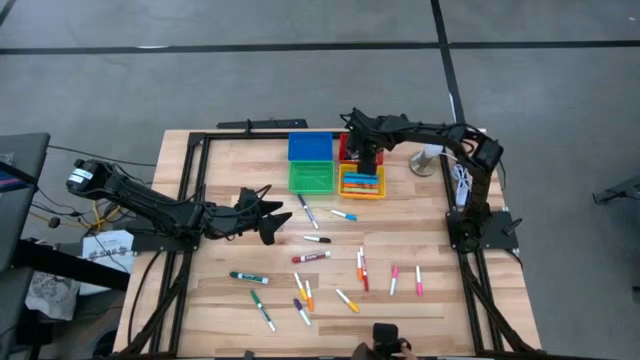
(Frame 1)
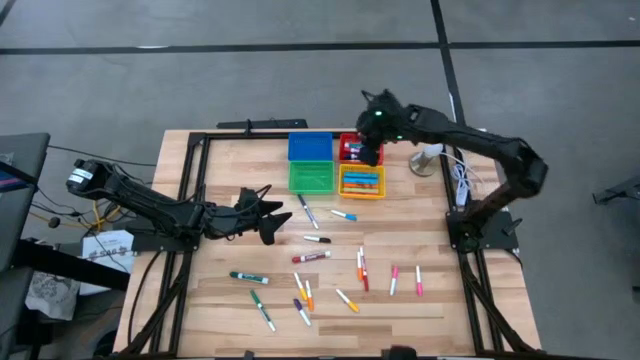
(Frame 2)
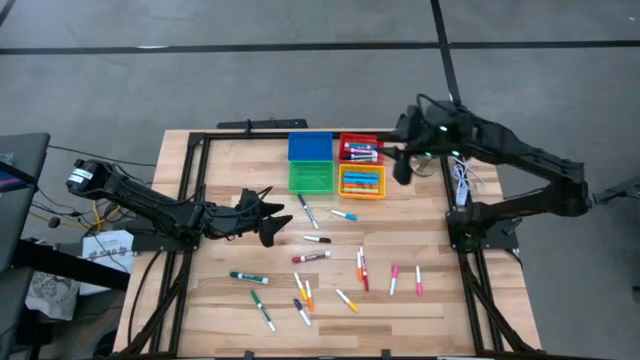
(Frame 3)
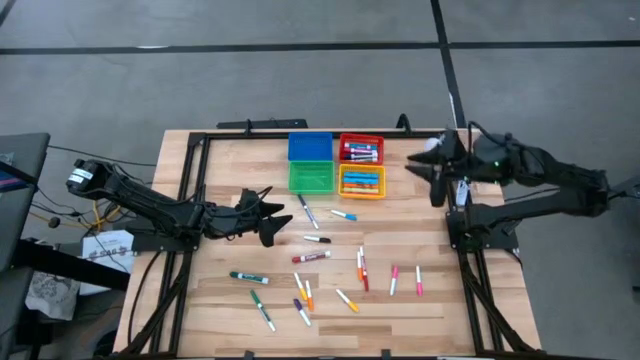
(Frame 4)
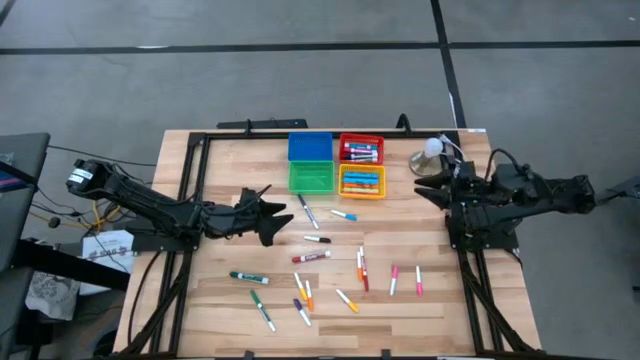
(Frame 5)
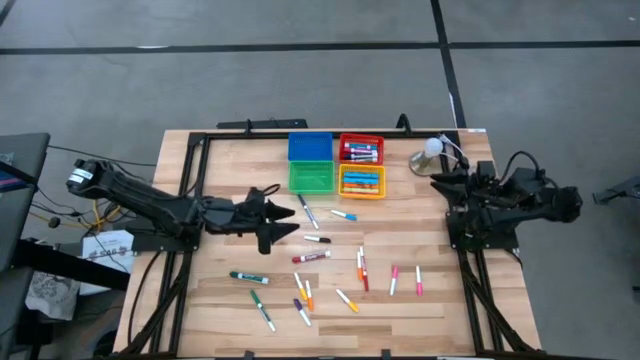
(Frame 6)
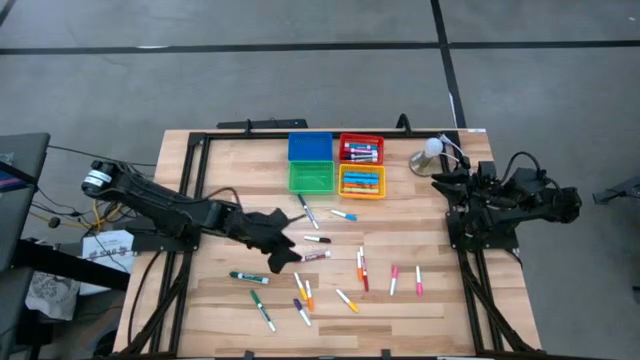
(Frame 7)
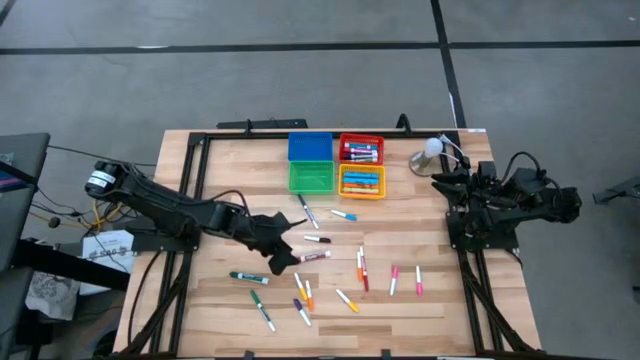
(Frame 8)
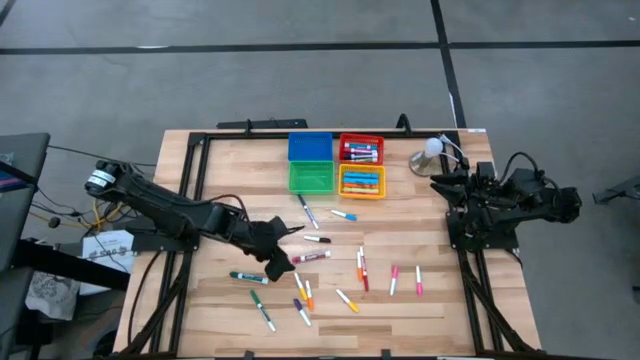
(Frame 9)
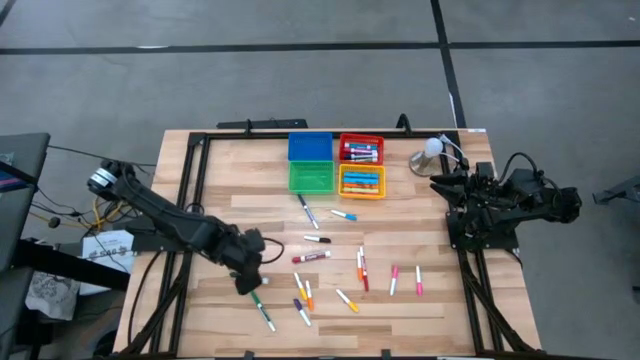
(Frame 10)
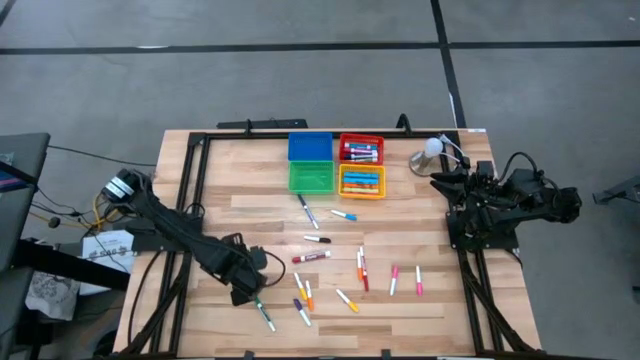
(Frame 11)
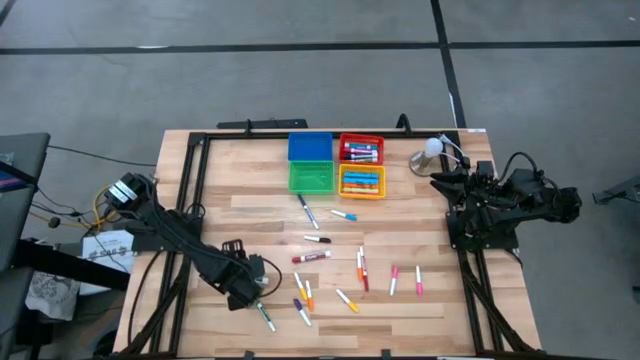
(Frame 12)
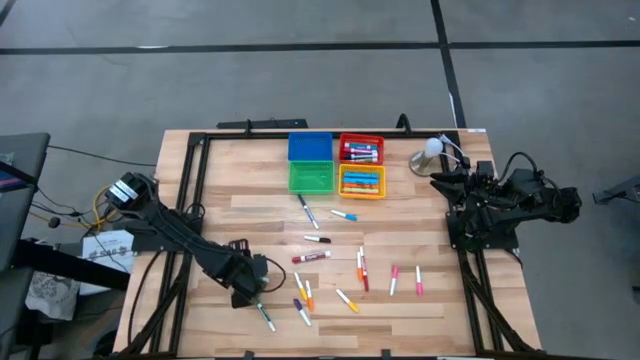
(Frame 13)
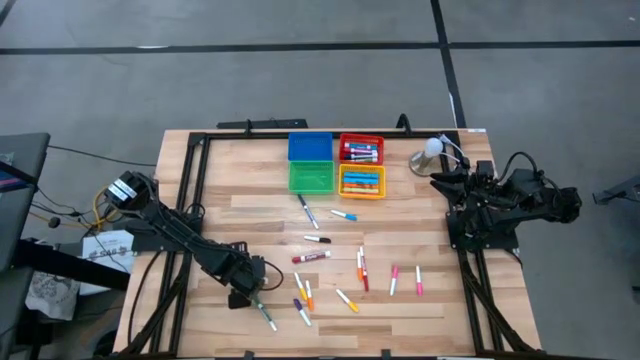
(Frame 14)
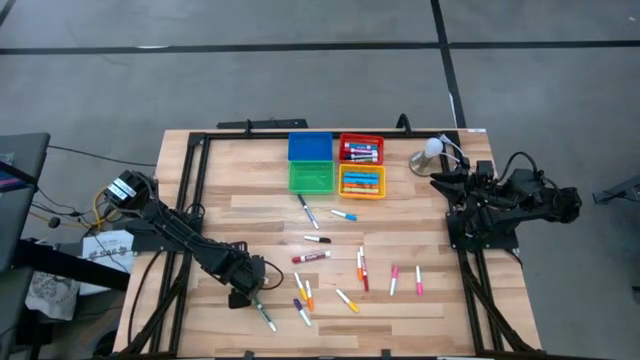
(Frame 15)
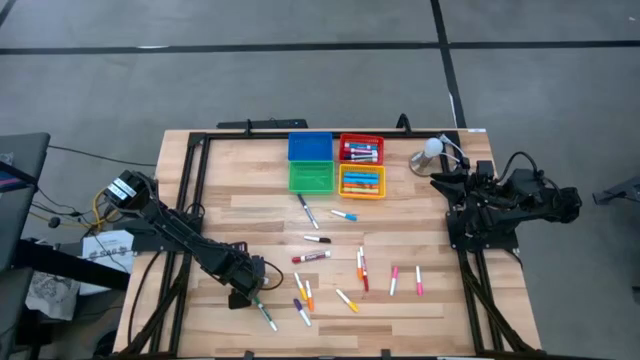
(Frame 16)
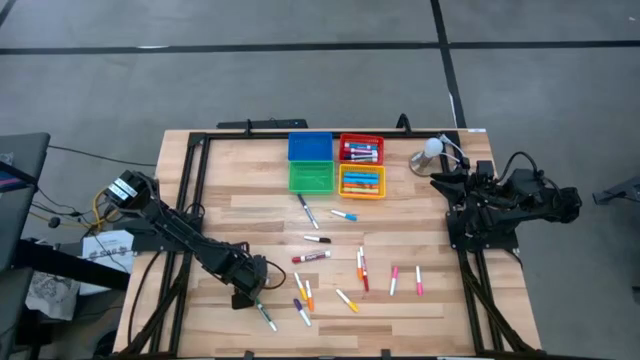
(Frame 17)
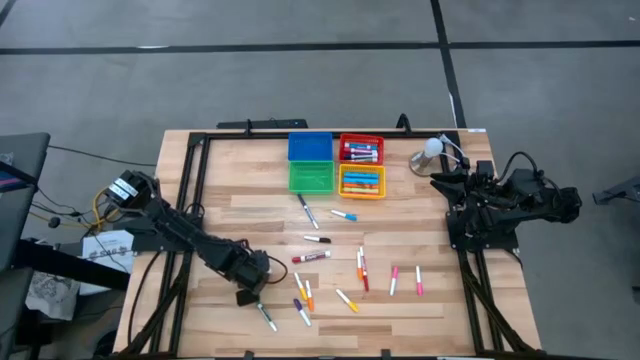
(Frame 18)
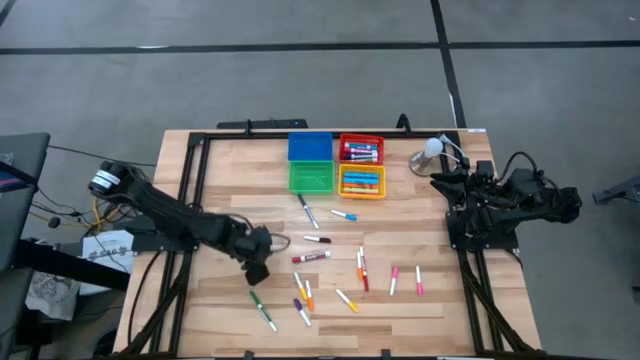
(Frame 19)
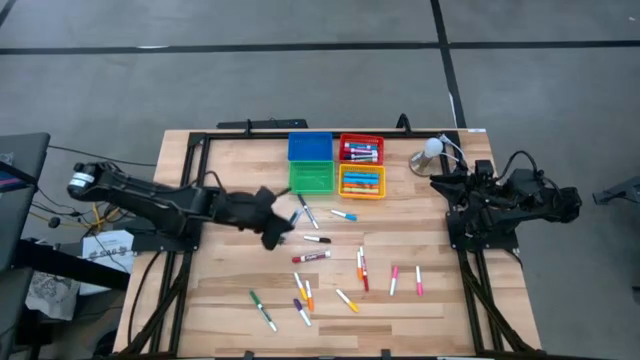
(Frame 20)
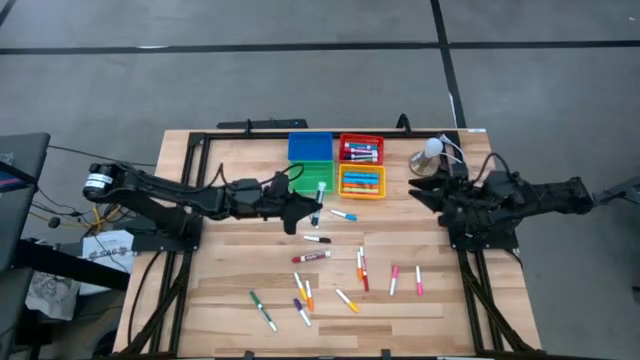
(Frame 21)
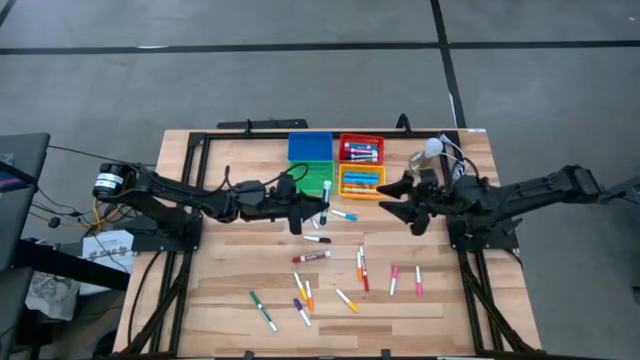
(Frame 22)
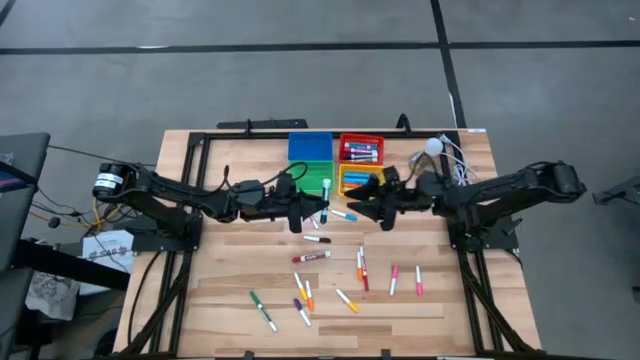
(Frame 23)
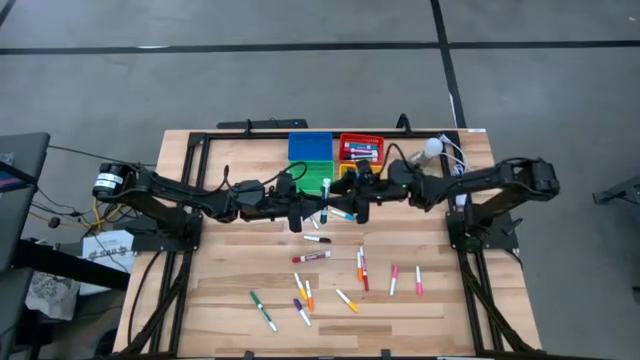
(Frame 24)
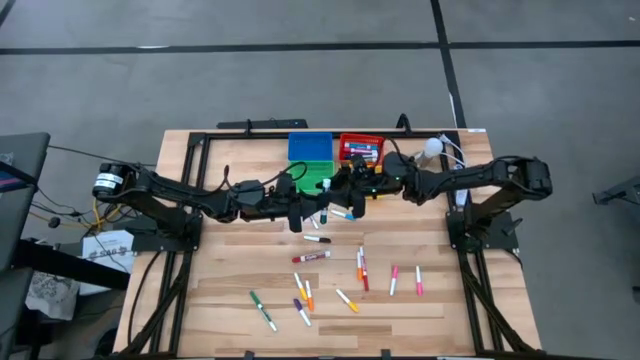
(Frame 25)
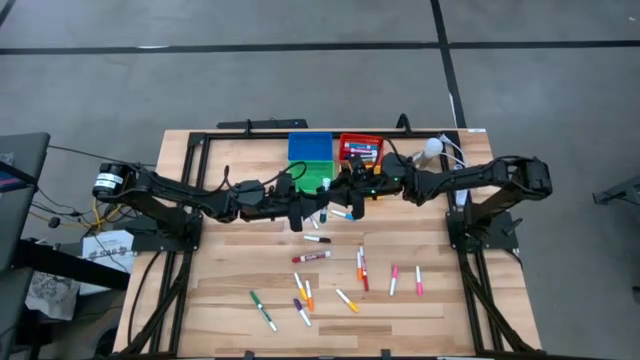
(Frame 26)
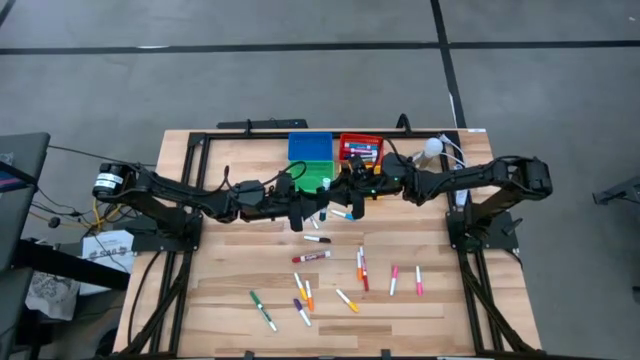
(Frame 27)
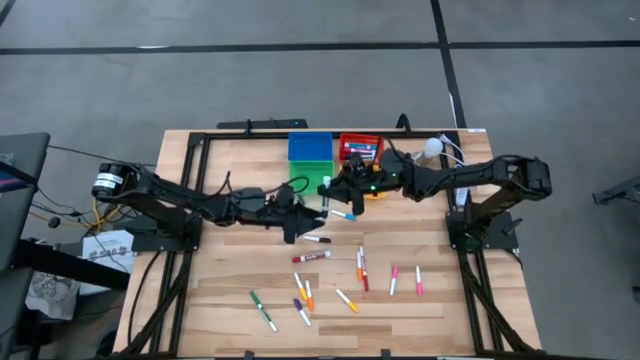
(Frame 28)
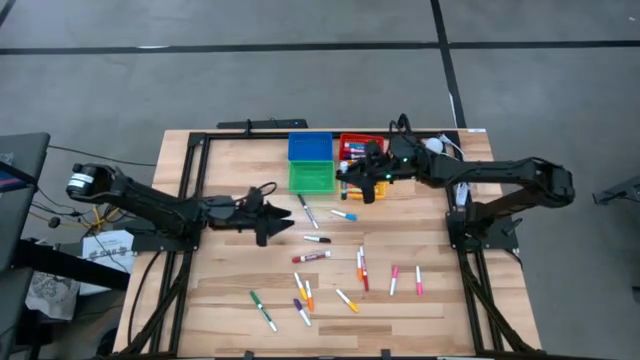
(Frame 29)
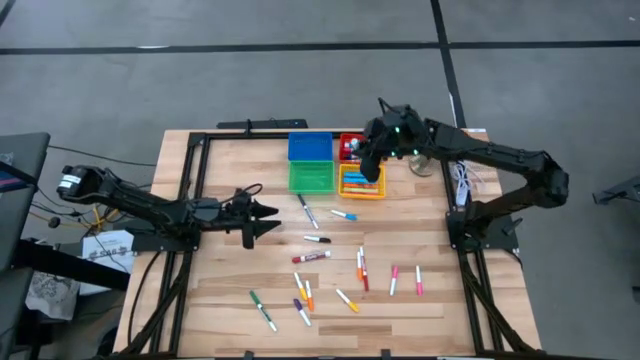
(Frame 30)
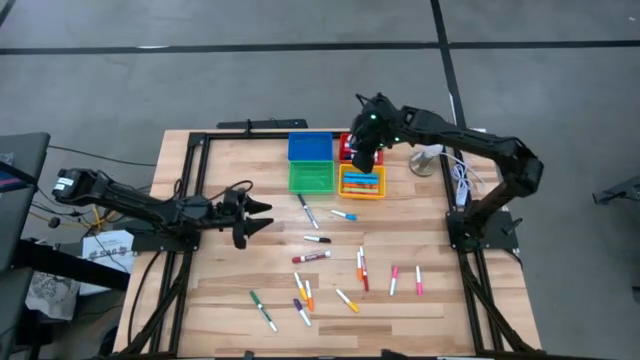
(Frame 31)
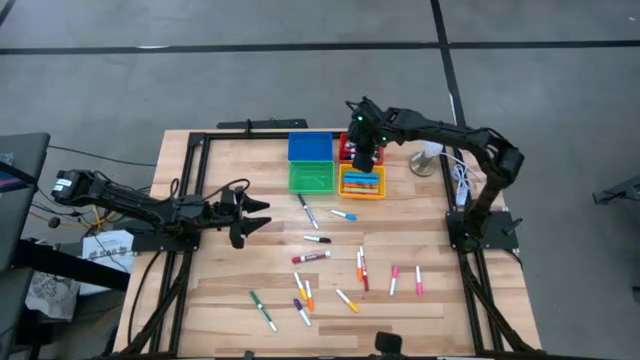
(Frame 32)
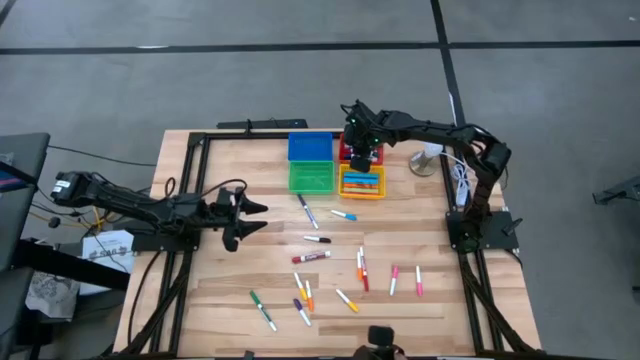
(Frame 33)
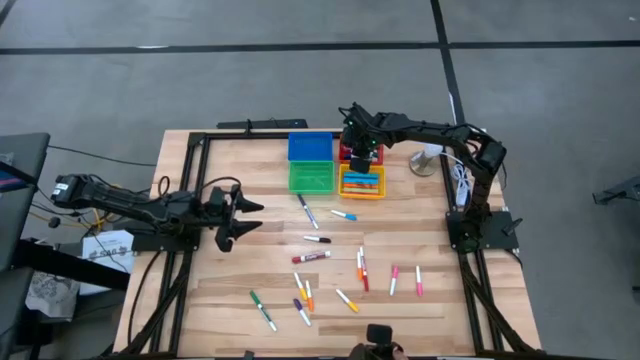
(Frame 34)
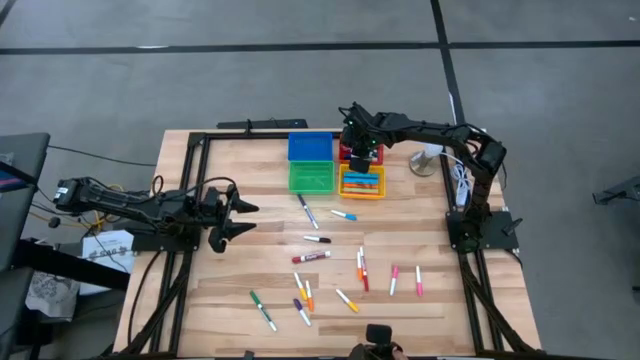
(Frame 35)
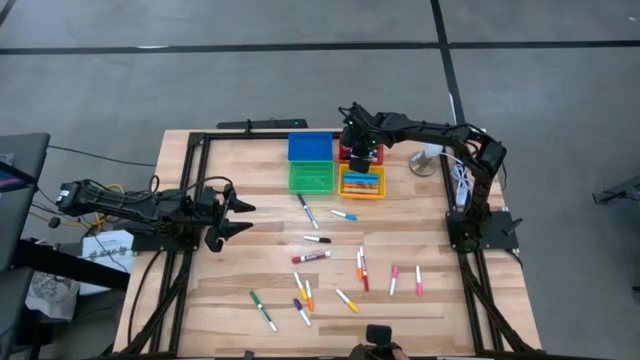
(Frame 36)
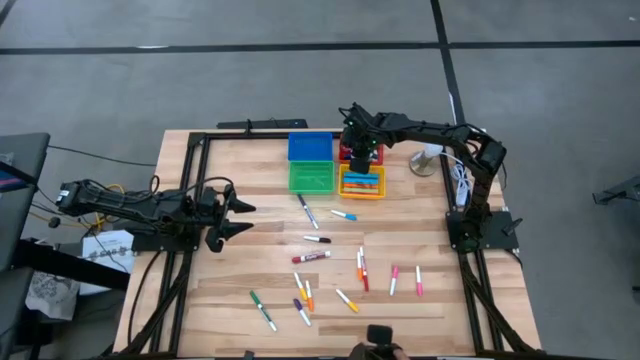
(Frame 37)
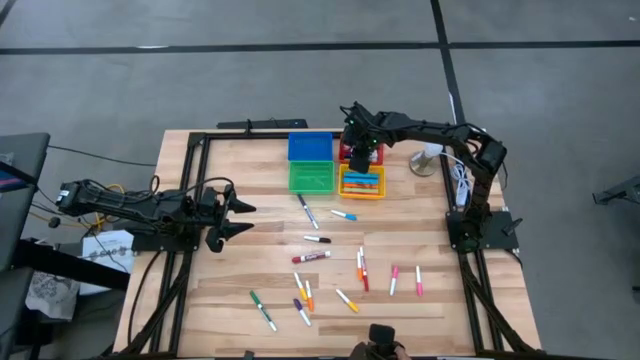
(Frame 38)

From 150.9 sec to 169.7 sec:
Task: Pick & Place Markers
Put the dark green marker pen into the red bin
